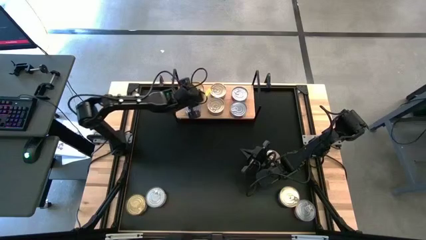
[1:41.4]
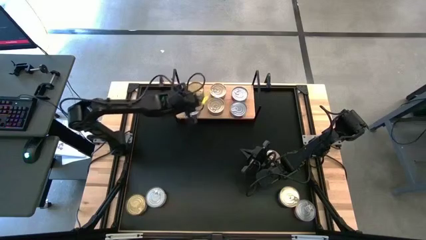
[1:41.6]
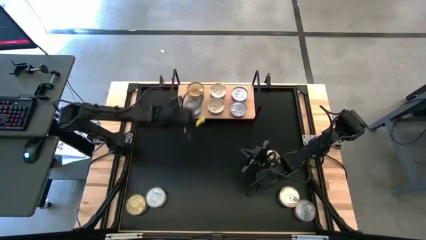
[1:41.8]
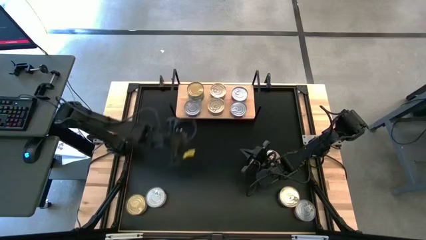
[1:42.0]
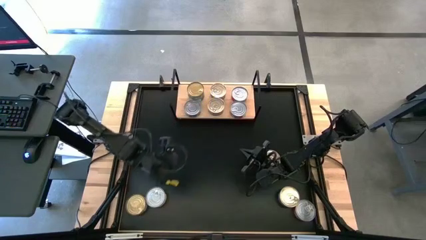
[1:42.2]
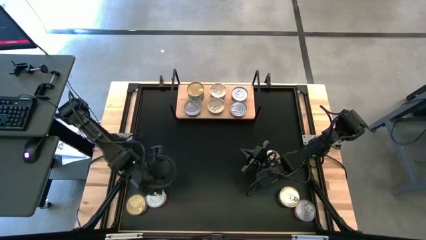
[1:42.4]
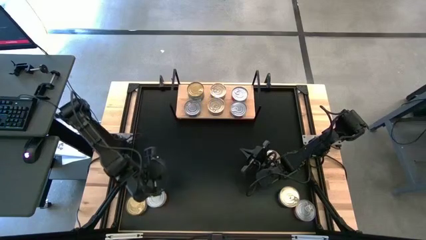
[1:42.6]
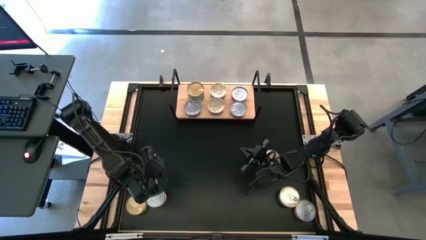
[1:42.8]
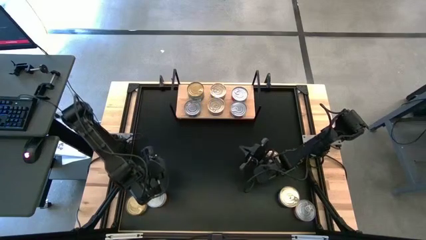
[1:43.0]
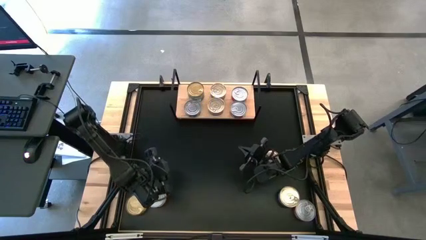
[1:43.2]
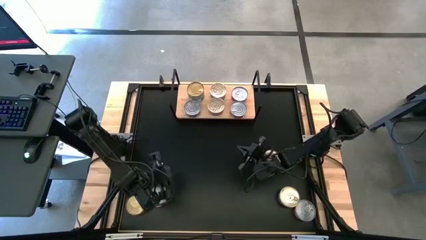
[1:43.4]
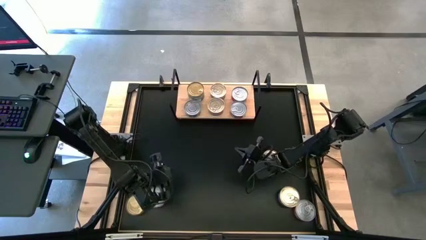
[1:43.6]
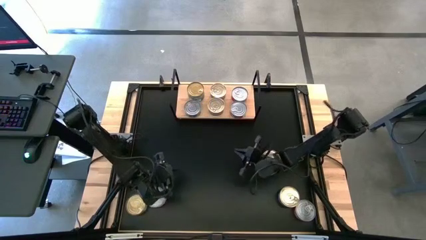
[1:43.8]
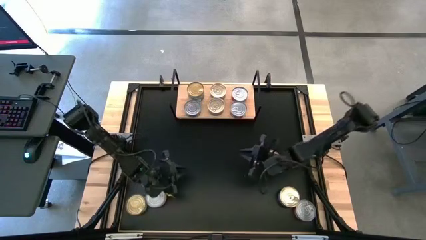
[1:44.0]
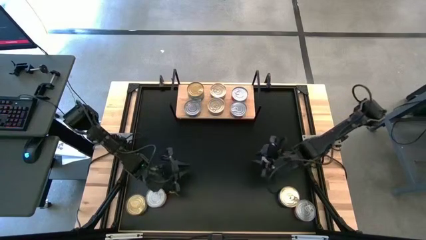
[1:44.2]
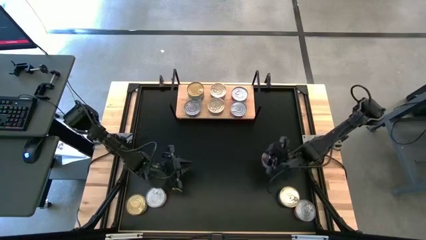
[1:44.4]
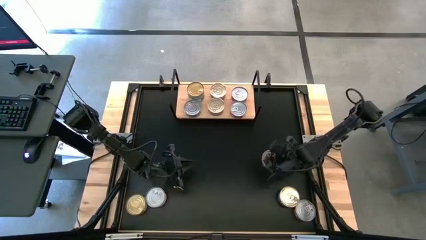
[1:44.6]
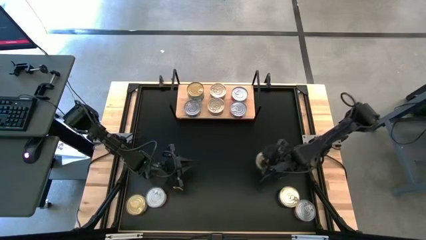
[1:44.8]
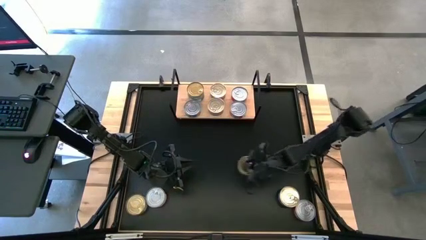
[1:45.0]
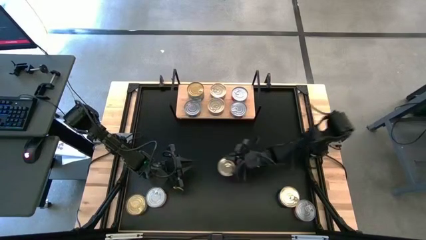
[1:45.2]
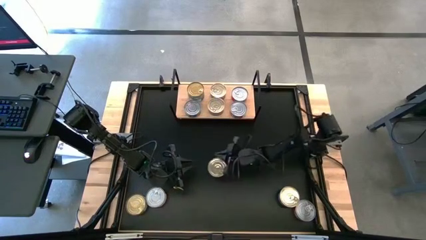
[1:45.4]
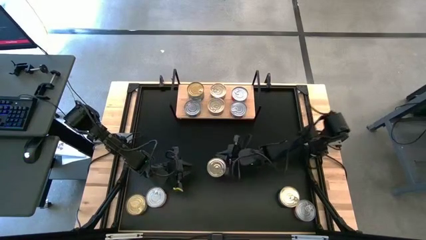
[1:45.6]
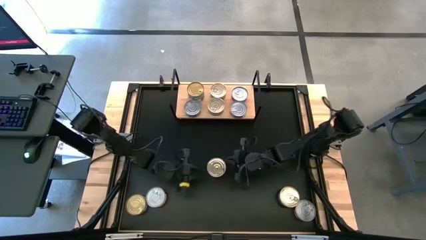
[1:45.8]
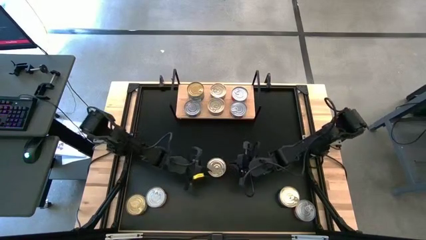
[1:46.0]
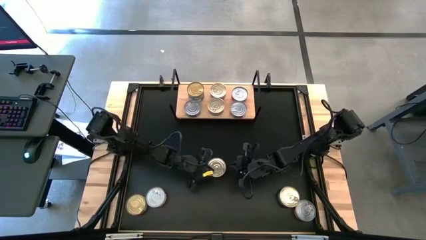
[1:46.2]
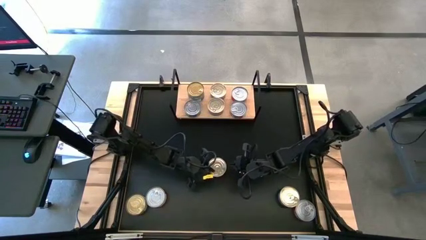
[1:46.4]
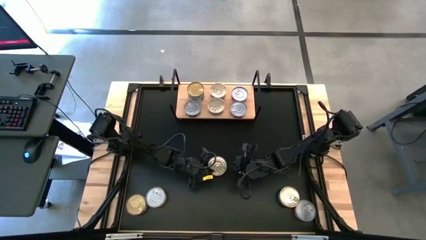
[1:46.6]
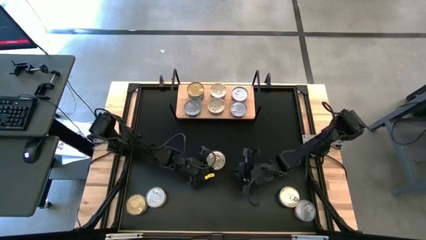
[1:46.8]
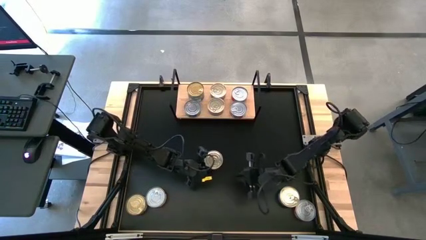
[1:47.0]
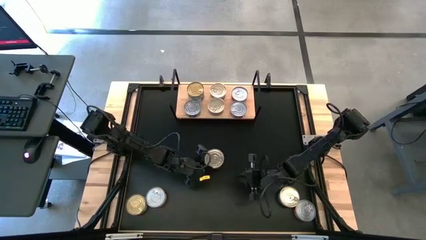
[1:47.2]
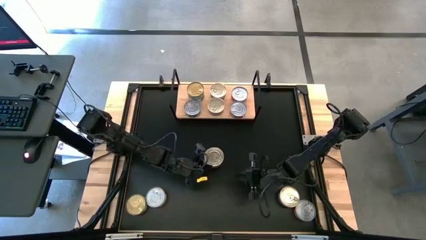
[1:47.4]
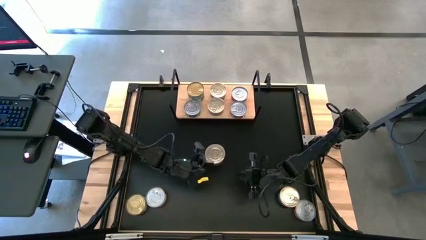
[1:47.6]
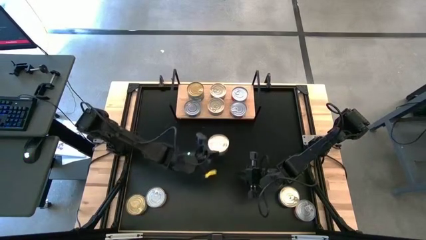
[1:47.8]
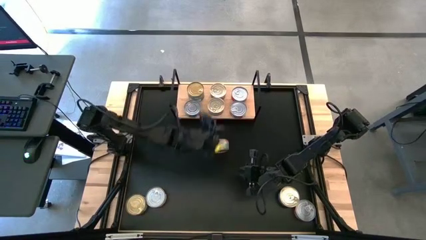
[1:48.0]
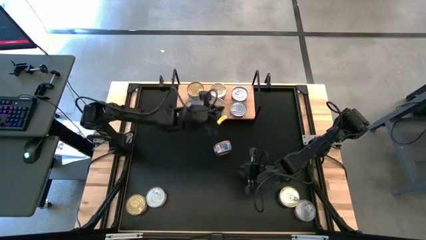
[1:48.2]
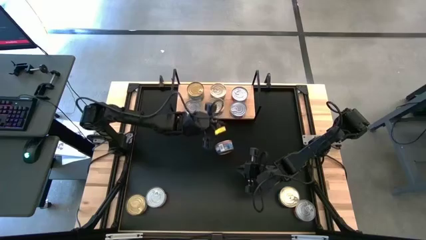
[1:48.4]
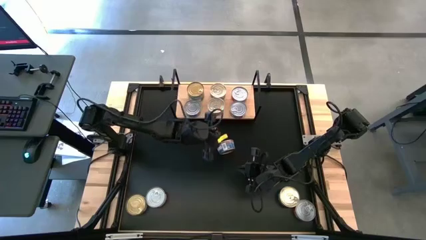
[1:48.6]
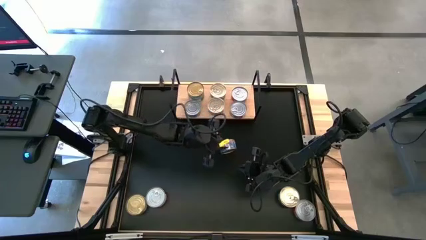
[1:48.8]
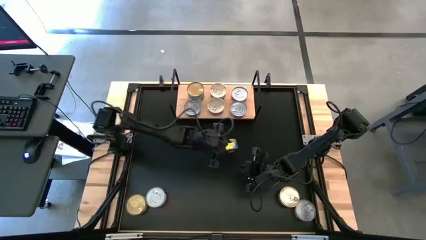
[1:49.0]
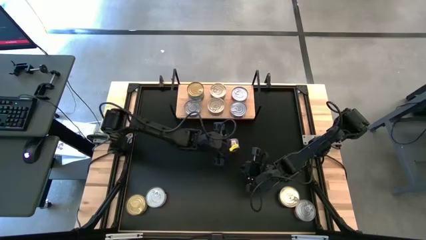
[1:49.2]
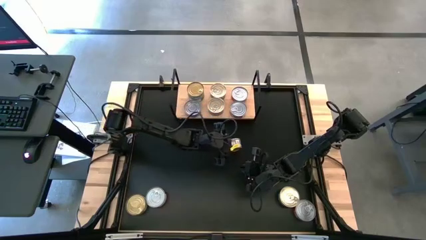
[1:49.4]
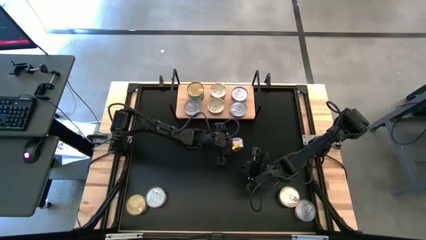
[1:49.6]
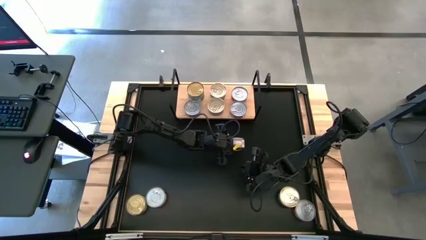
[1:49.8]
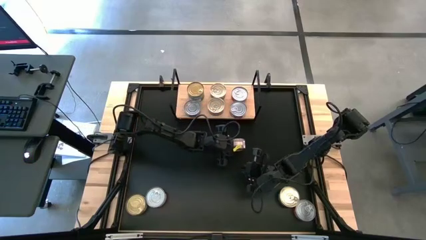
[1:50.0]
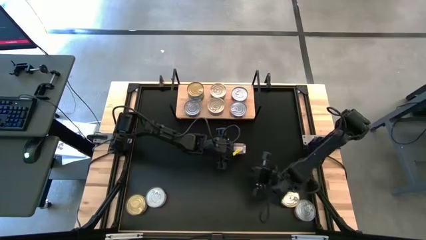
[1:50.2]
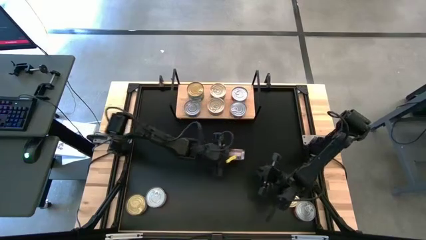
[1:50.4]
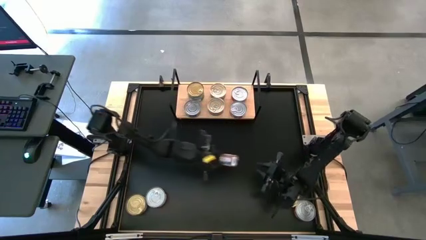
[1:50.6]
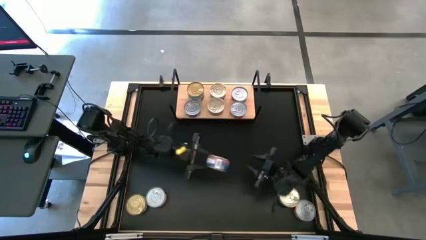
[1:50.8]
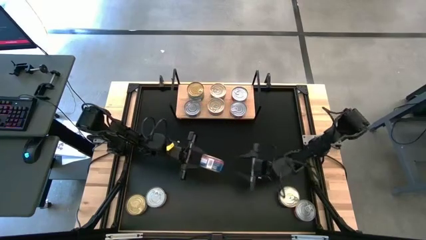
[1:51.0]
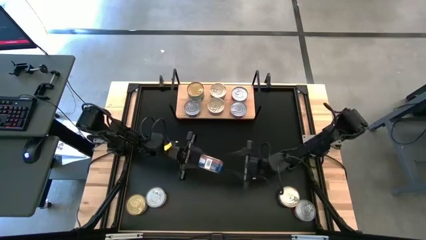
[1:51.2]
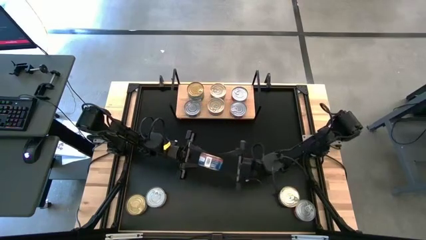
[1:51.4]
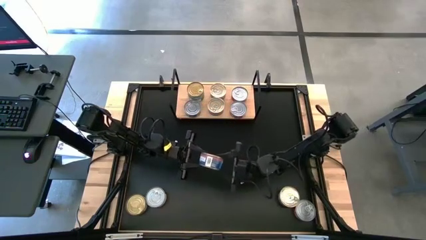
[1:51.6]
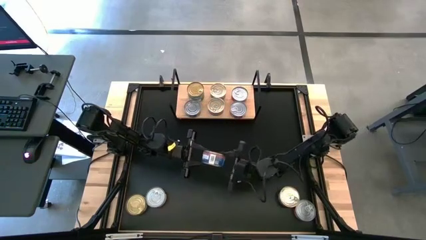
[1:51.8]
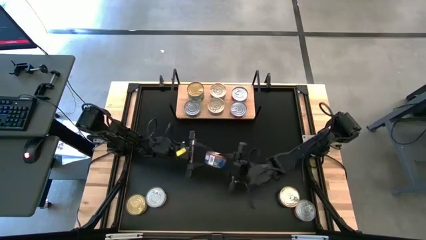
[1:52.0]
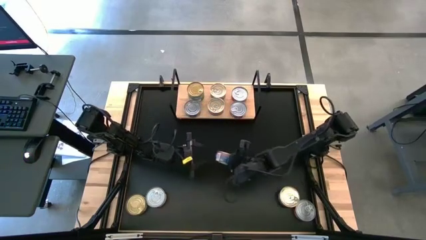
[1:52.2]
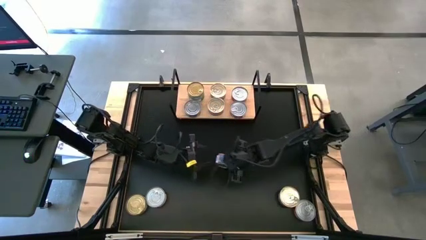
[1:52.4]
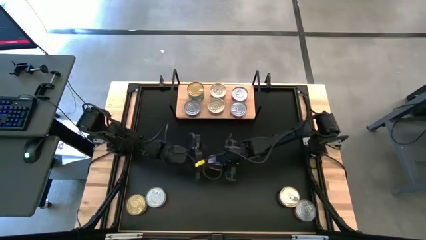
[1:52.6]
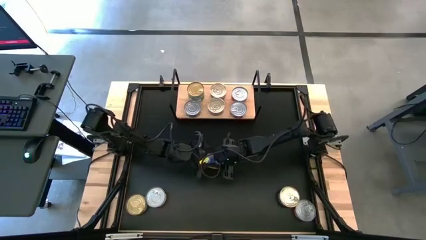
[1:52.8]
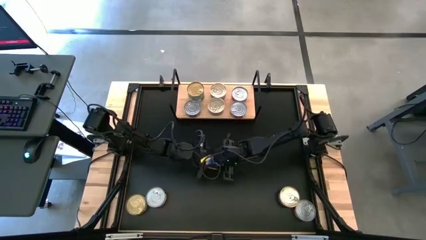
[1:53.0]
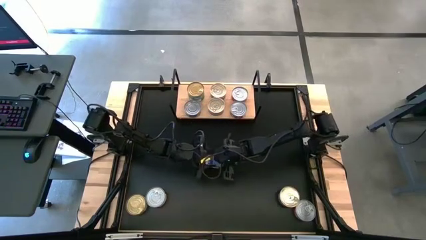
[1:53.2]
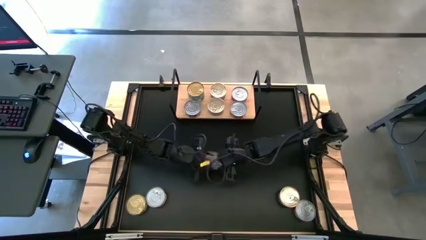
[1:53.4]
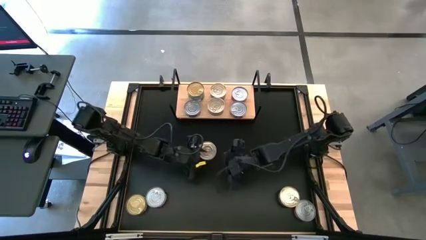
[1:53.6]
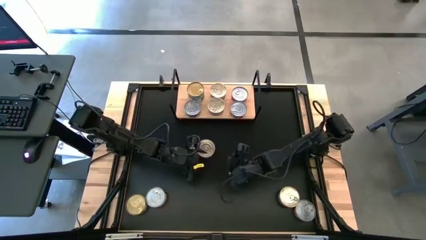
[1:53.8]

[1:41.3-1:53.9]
Task: Stack canned seafood by type on shelf
Stack the blue-pink tuna can on top of other blue-pink tuna can on the shelf

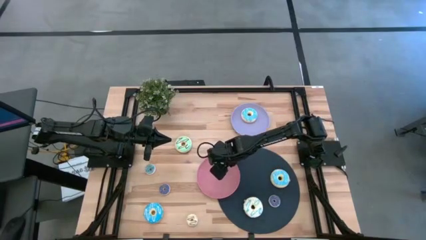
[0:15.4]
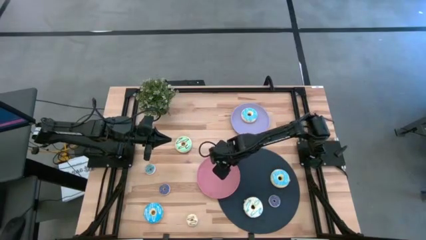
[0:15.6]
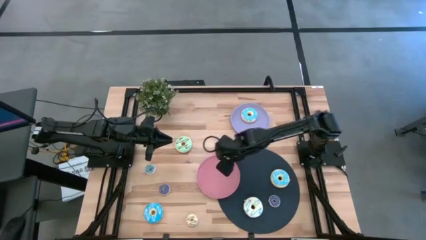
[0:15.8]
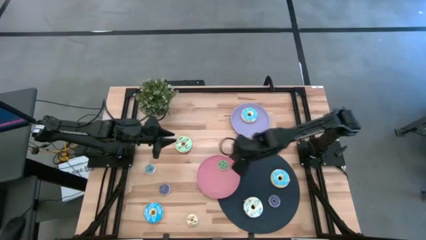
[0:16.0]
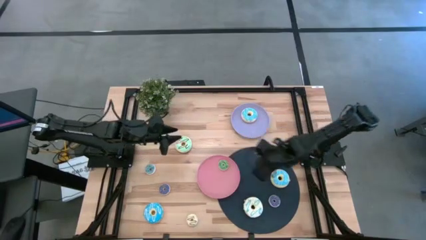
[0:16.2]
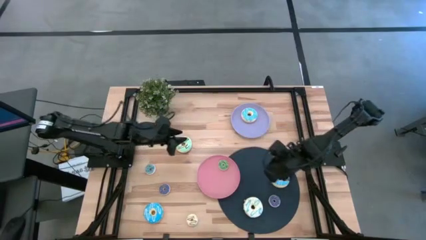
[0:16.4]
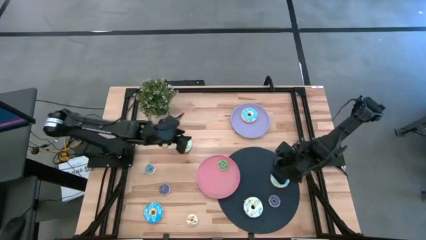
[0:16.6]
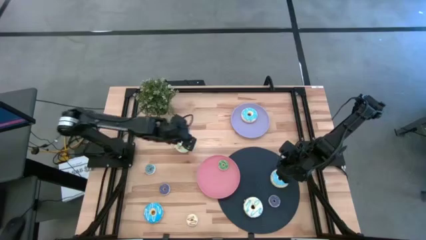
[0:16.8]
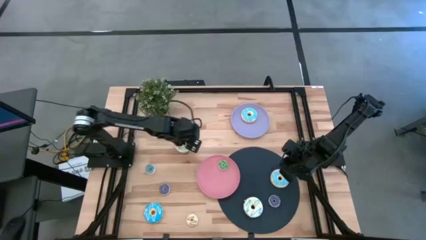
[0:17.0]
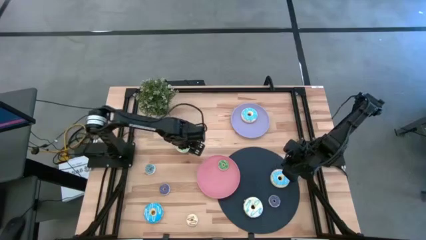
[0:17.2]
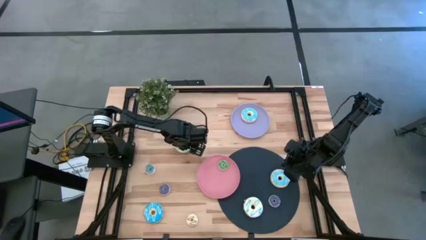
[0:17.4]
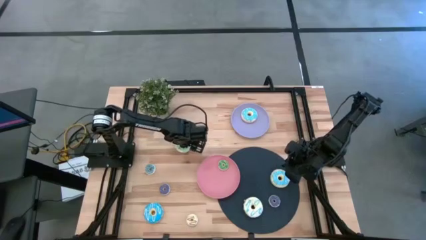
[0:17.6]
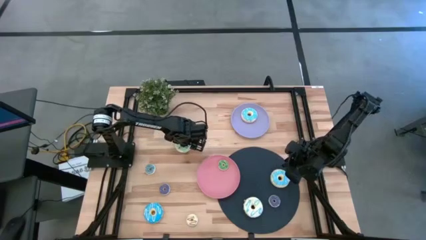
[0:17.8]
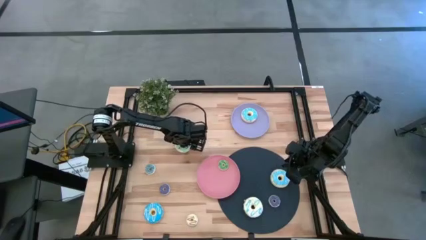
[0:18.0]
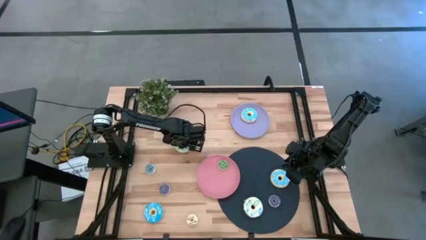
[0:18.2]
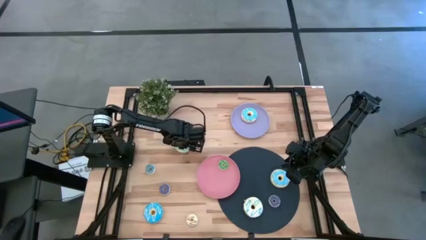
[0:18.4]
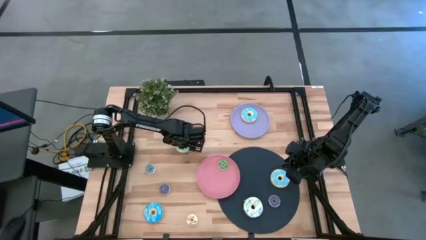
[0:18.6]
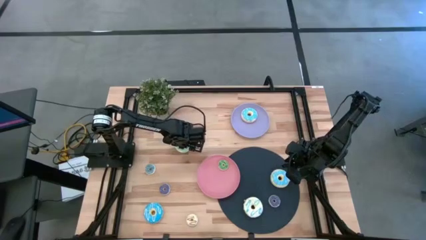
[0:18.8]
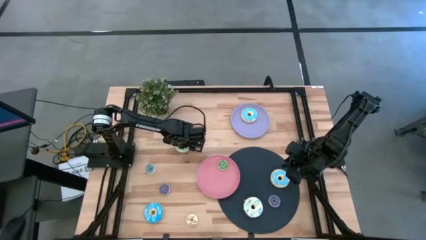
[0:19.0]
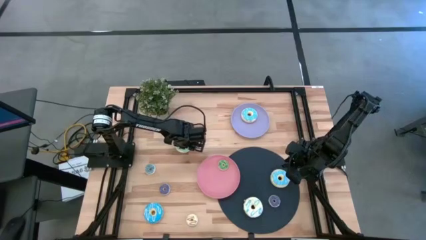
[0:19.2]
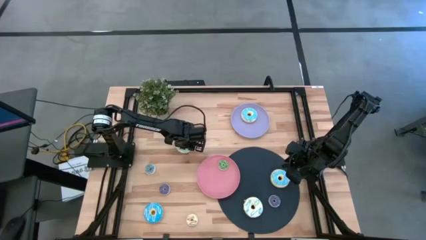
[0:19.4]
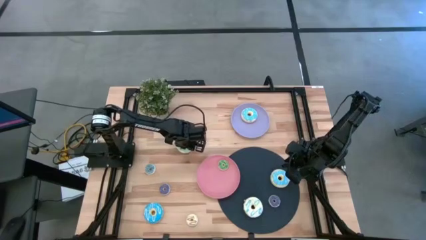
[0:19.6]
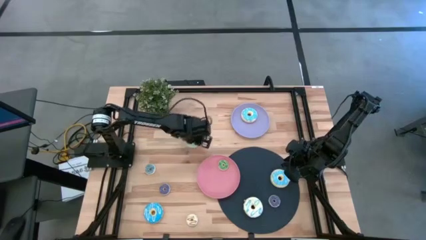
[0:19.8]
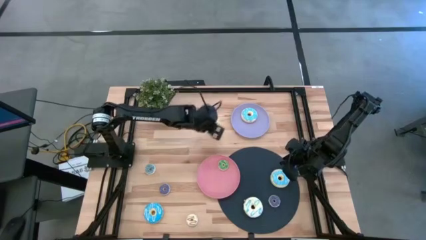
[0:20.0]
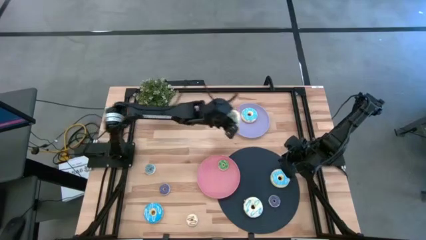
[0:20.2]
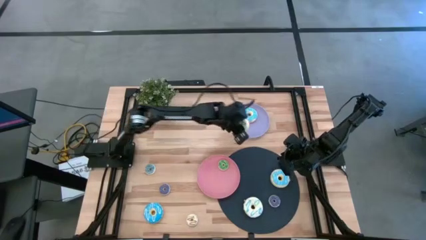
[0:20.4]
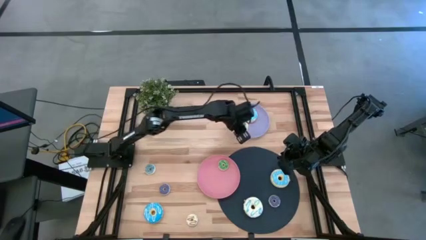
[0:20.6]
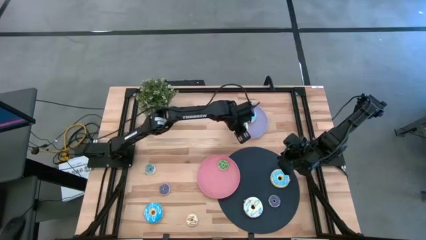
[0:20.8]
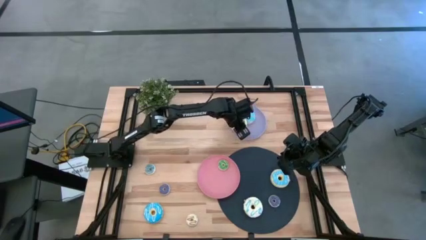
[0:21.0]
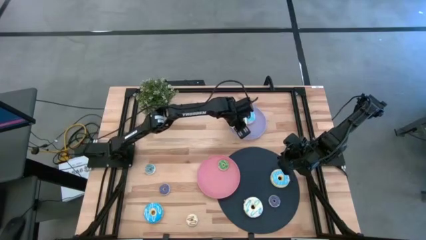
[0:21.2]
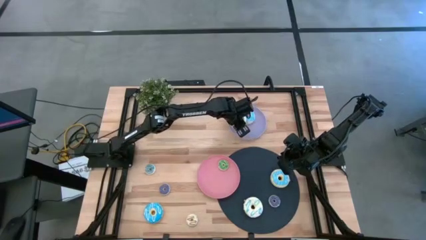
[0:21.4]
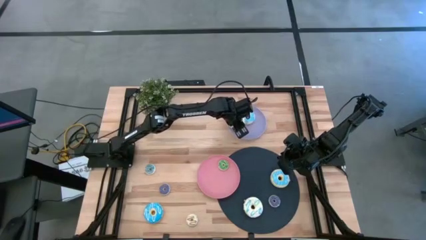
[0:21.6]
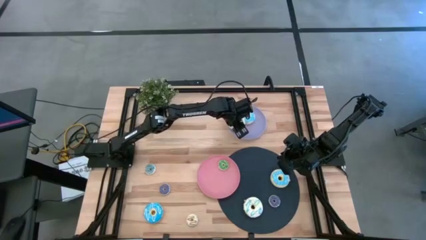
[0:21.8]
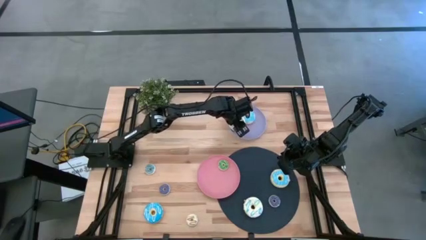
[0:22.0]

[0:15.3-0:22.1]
Task: Pick & Place donuts
Put the big light blue donut on the purple plate
